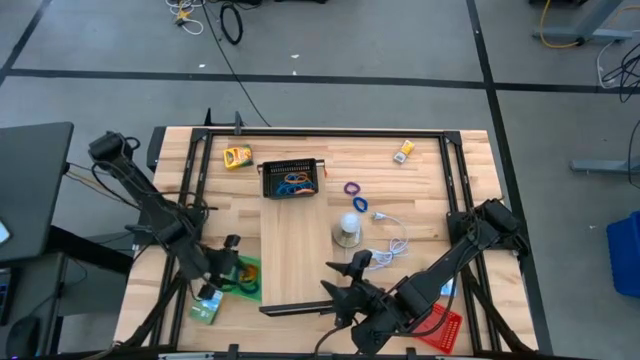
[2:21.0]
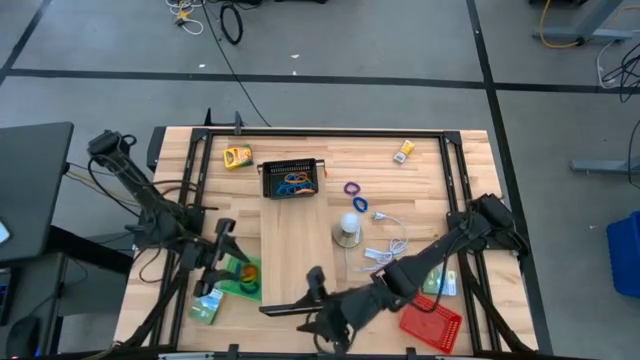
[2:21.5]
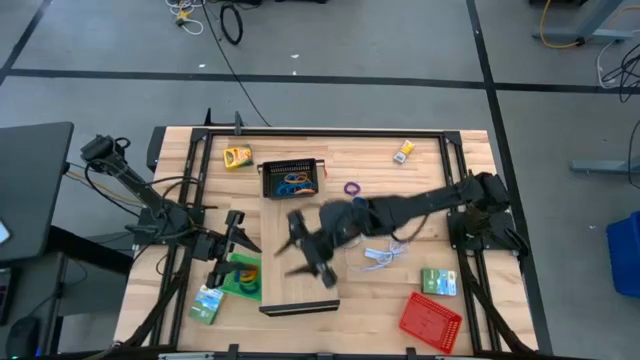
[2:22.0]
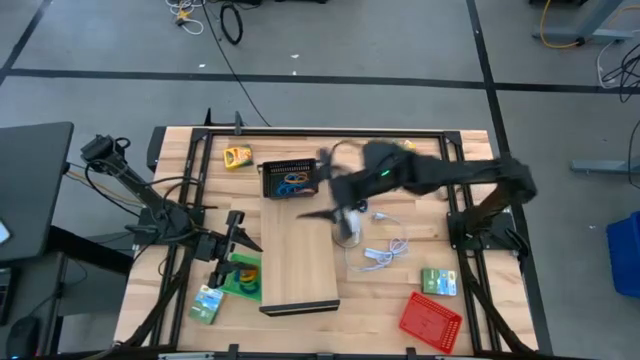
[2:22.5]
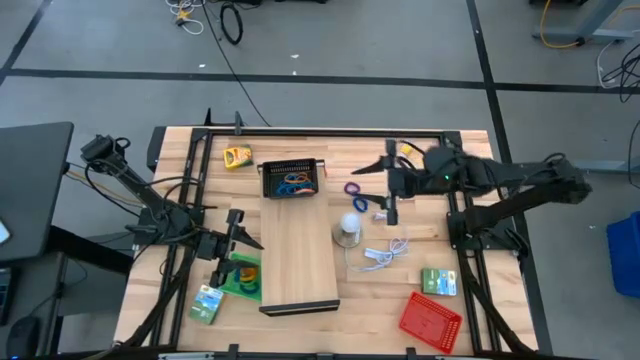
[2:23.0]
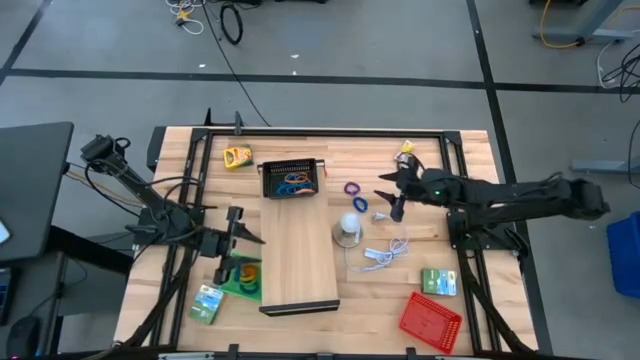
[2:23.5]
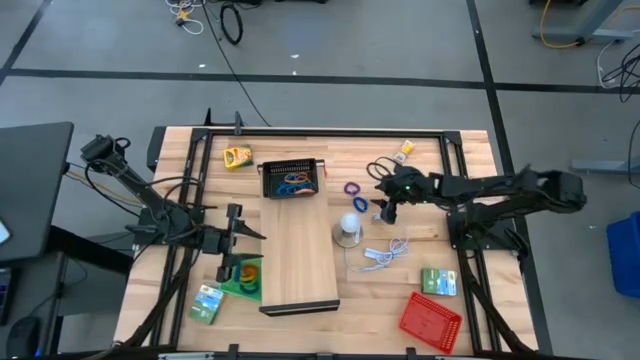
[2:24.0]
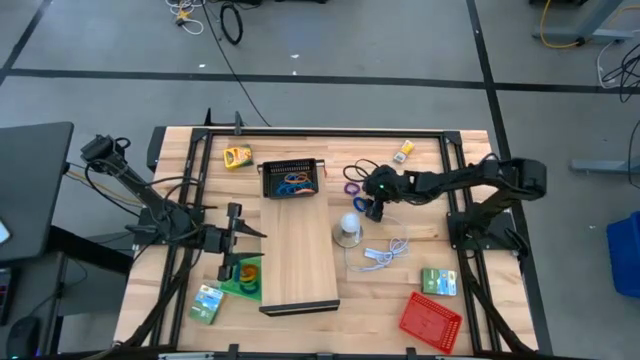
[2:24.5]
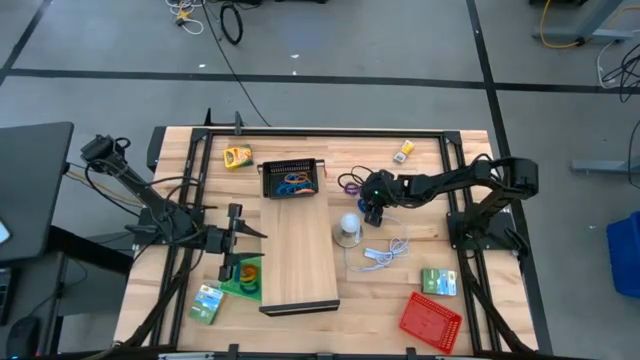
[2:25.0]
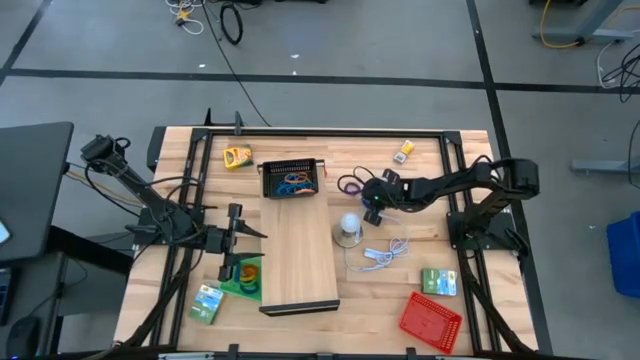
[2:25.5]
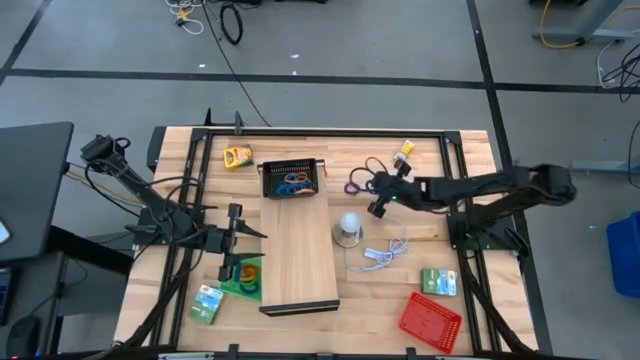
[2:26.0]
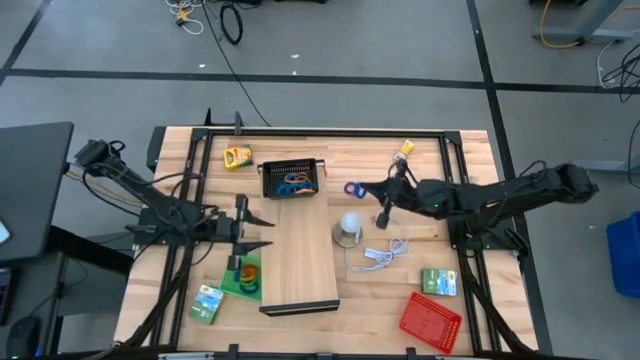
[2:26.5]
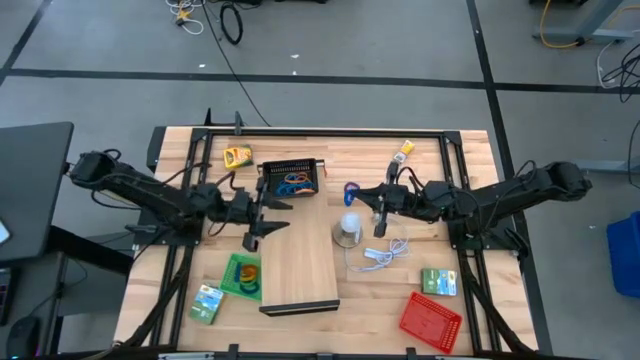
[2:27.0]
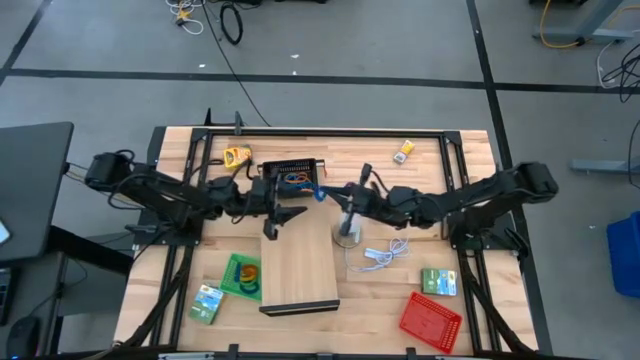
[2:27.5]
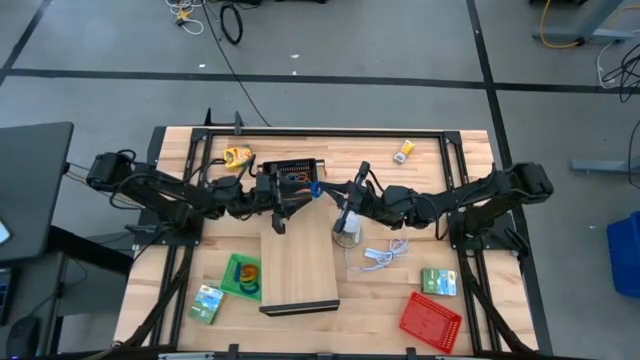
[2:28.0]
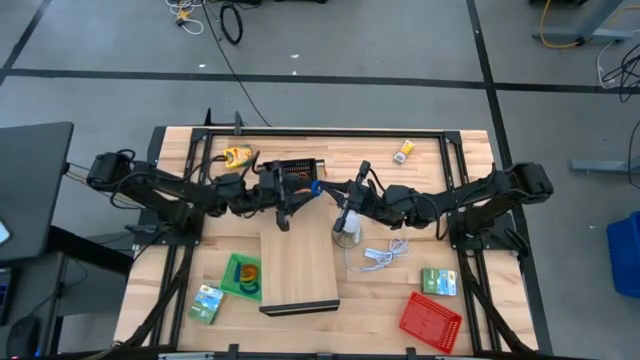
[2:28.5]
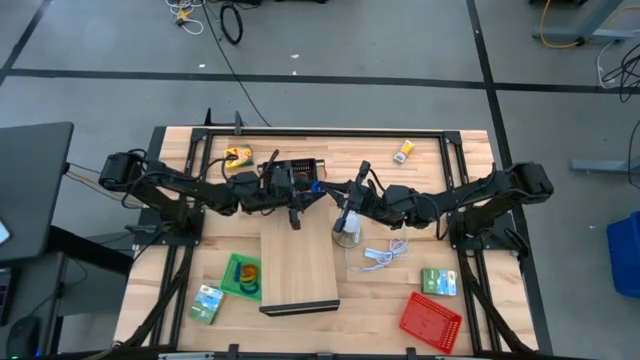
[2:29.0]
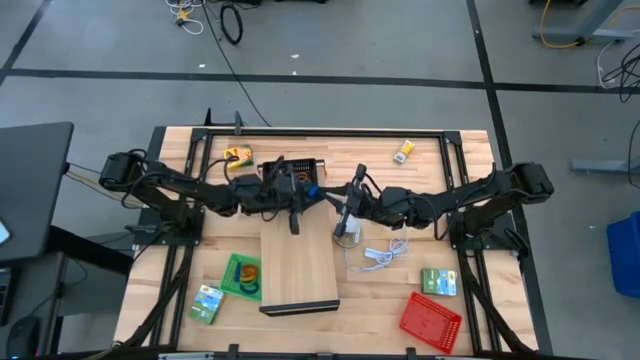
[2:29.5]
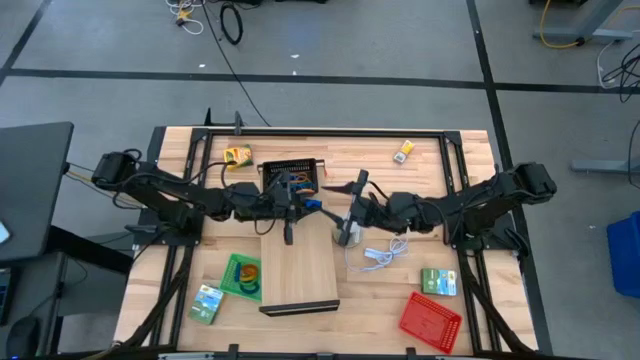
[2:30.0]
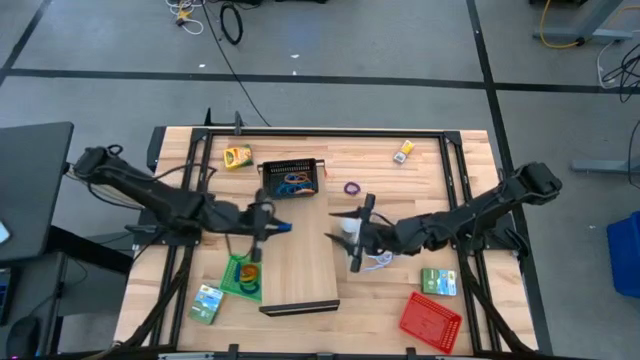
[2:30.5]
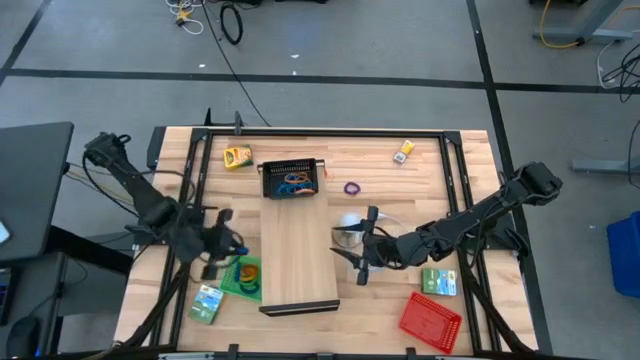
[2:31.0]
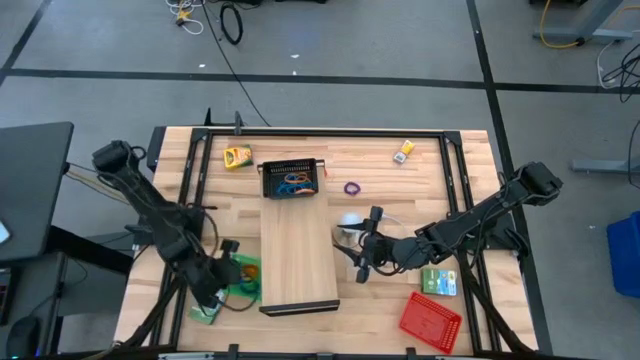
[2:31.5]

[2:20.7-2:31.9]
Task: Pick & Place Office Desk Supplies
Put the blue spiral keychain into the green bin

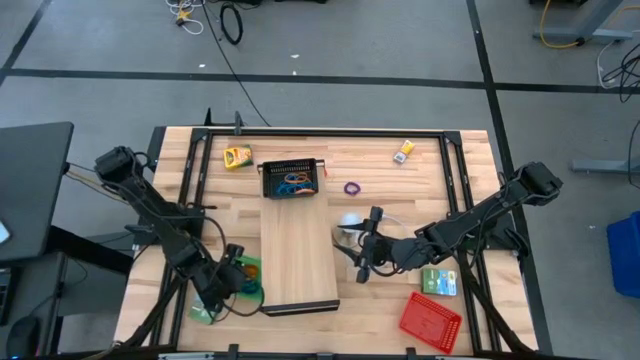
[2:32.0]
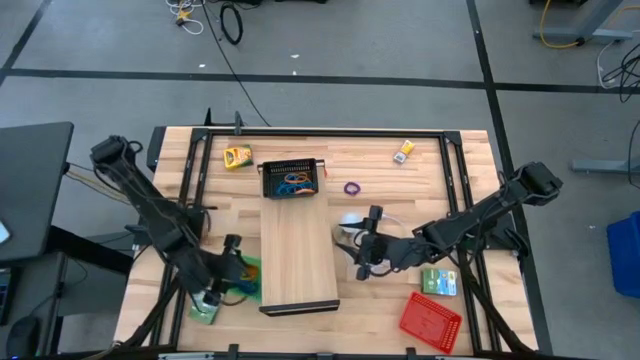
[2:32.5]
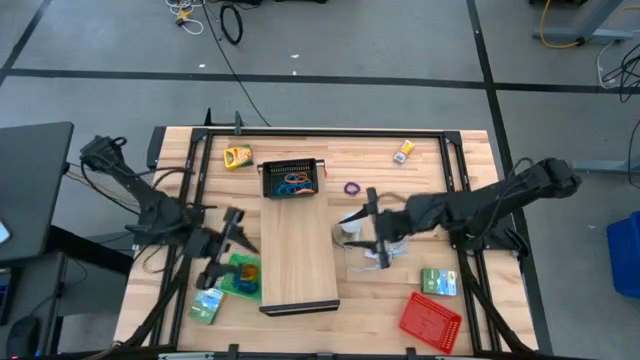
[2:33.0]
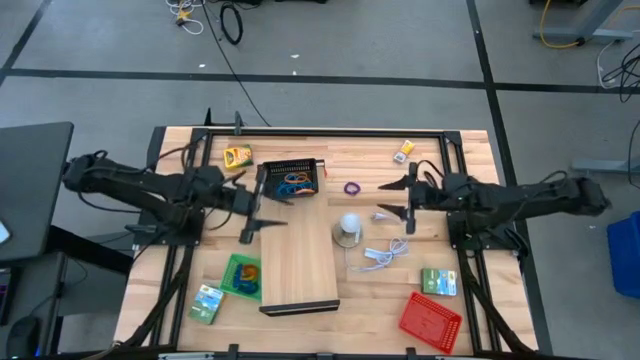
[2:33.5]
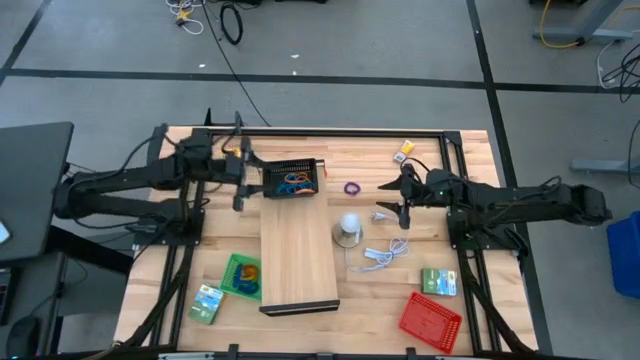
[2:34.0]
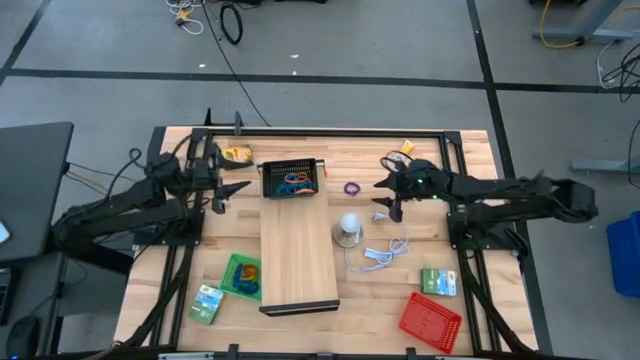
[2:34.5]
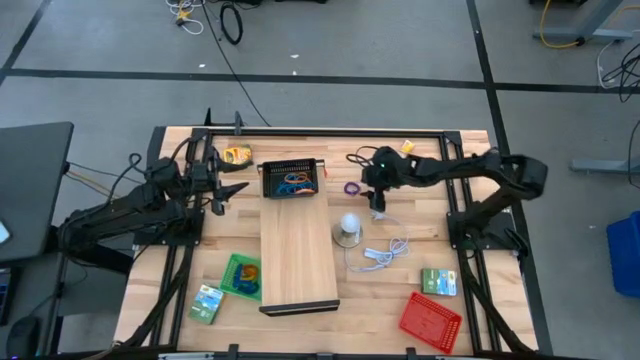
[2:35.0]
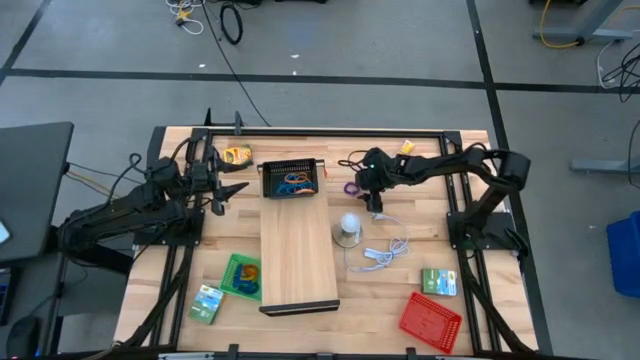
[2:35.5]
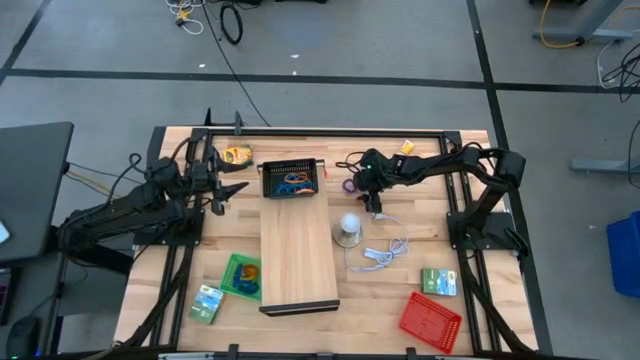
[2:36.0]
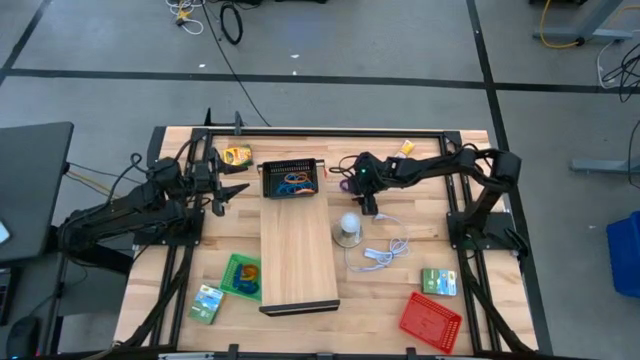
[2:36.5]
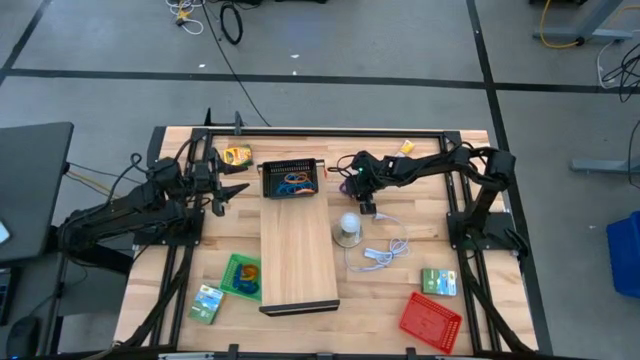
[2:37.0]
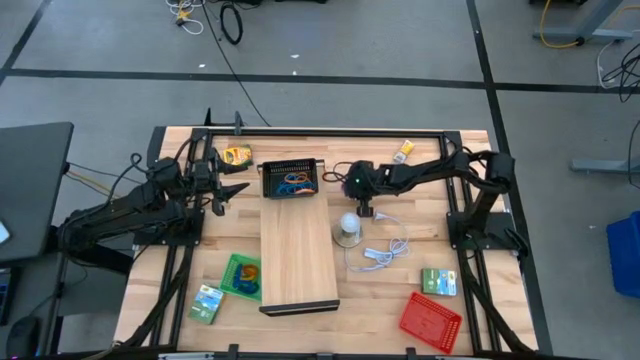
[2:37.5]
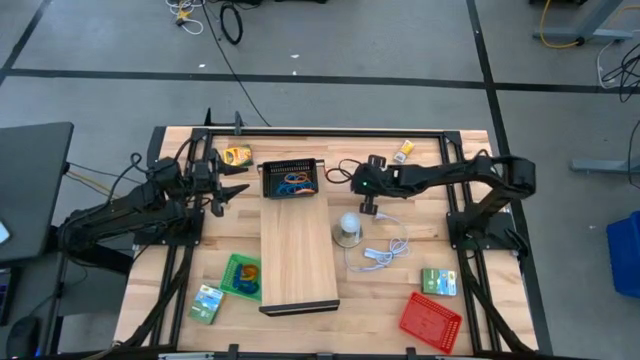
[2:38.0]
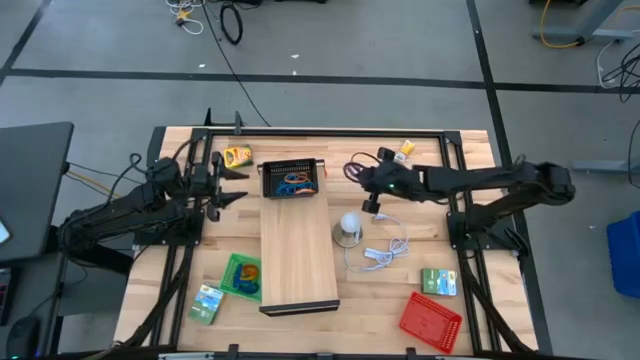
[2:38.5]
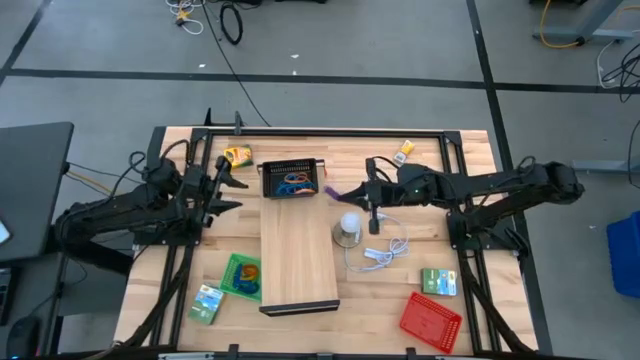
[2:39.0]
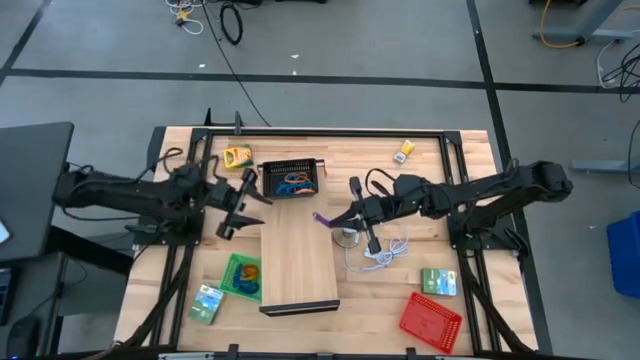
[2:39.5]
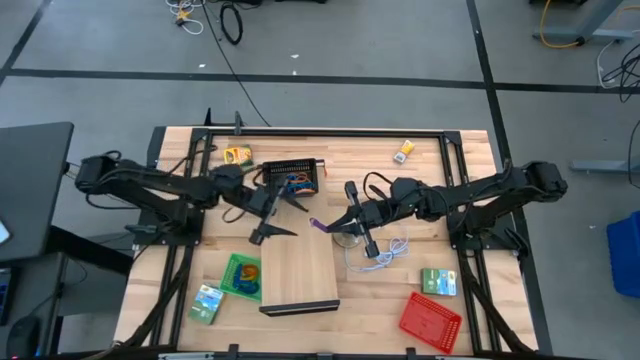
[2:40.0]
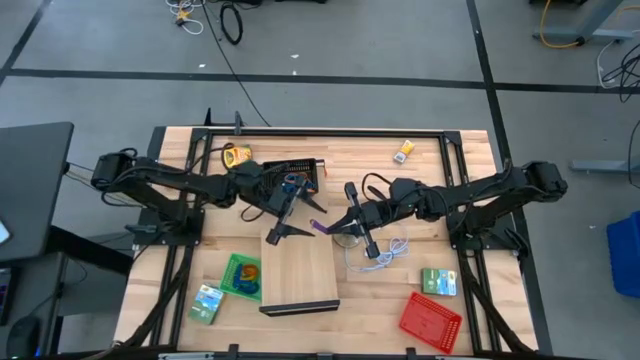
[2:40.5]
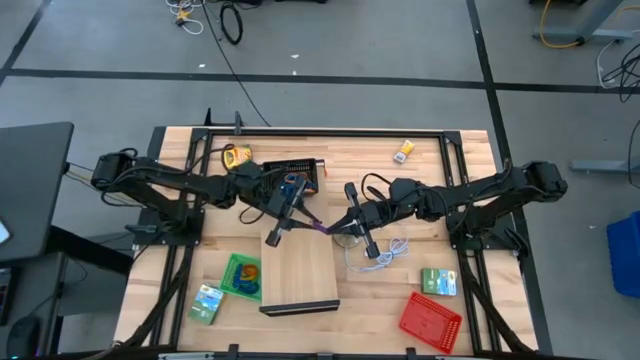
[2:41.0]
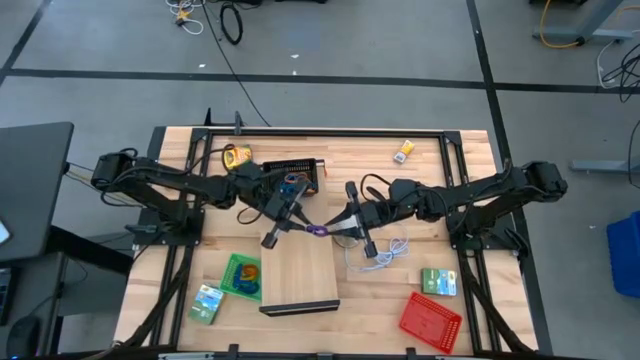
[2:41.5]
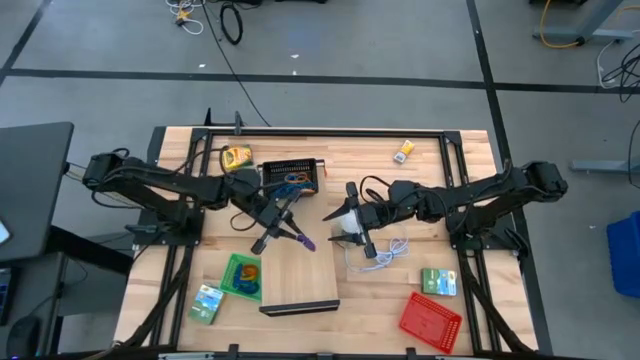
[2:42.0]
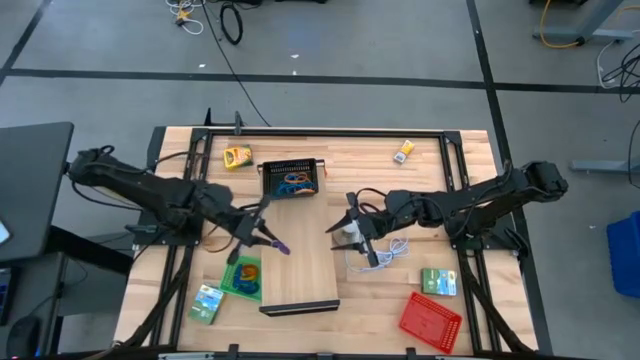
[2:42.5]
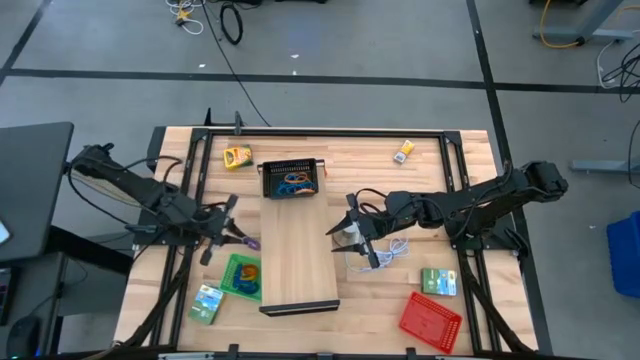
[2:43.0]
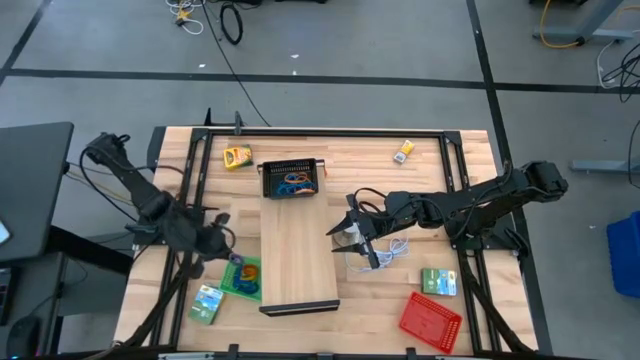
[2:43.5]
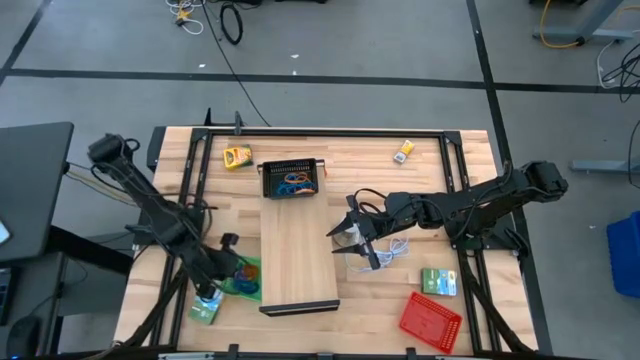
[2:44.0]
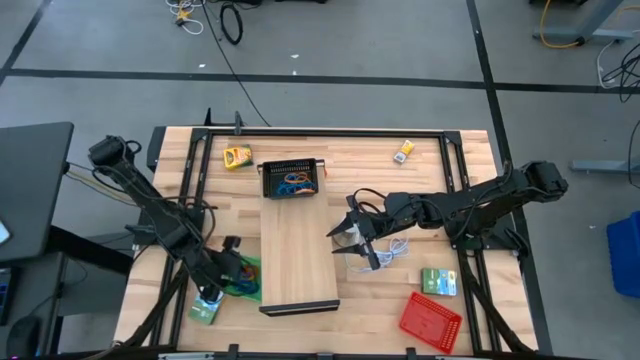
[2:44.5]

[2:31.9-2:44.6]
Put the purple spiral keychain into the green bin
